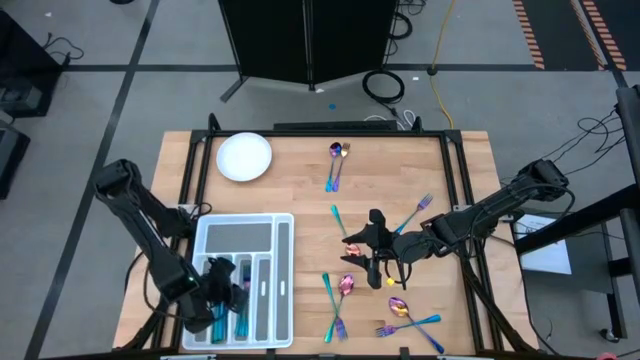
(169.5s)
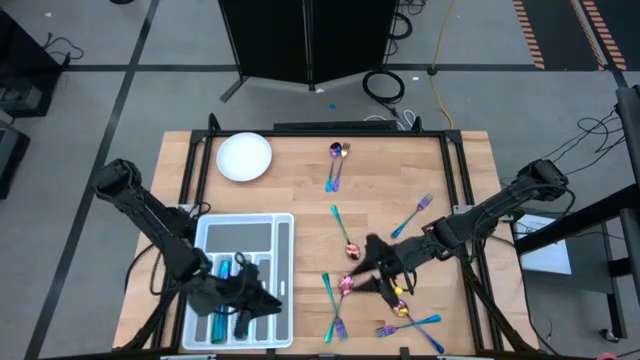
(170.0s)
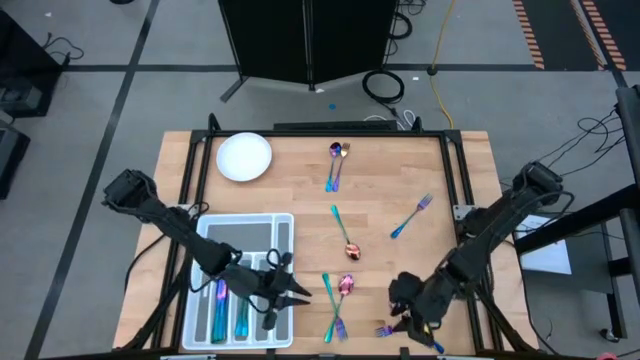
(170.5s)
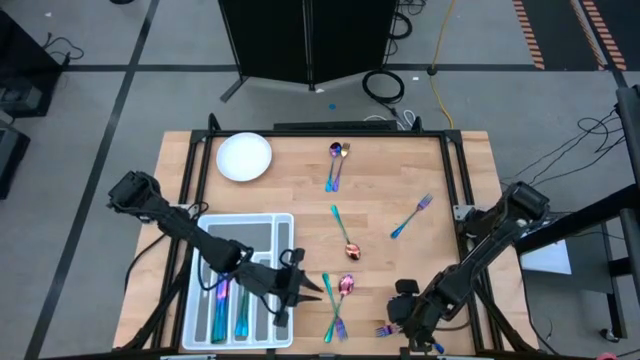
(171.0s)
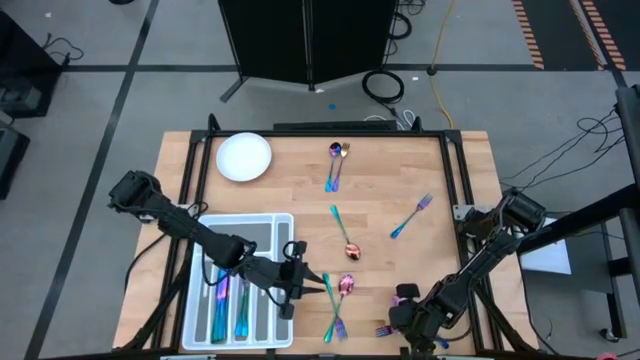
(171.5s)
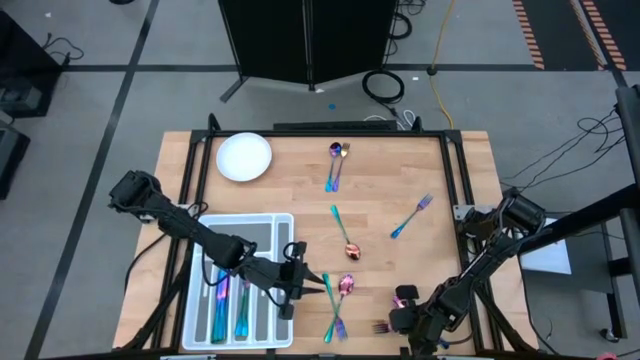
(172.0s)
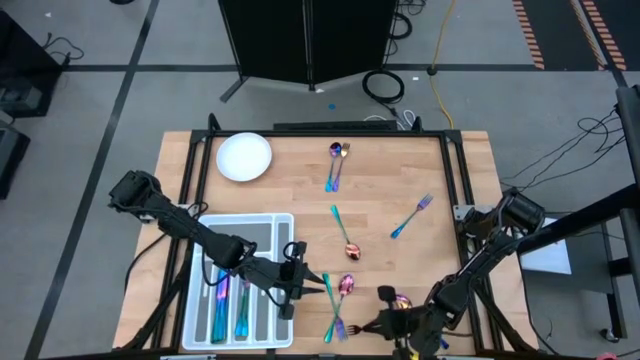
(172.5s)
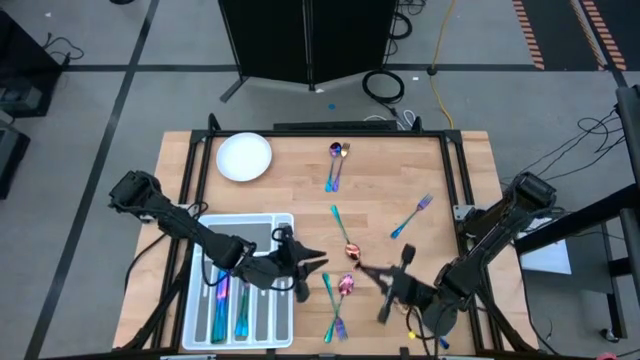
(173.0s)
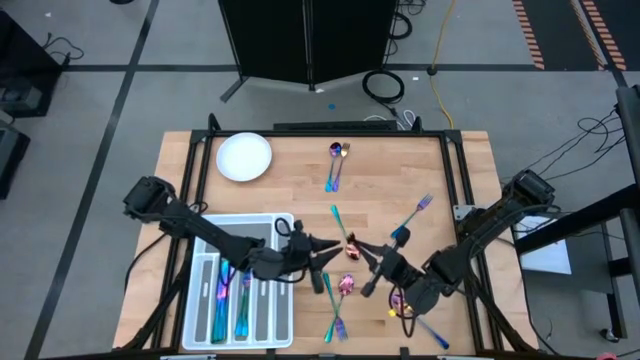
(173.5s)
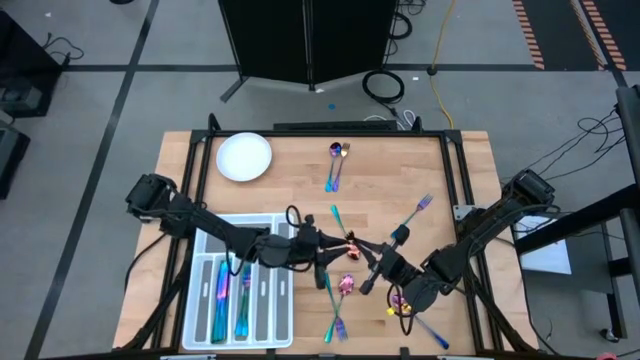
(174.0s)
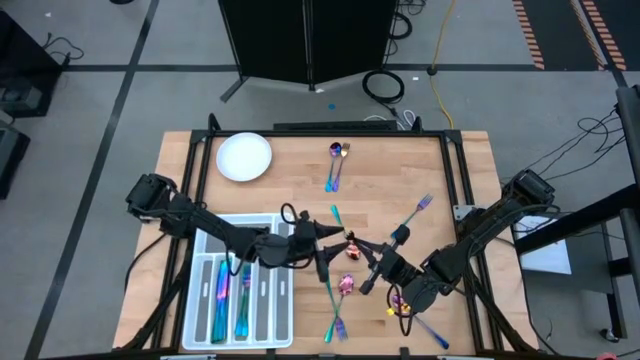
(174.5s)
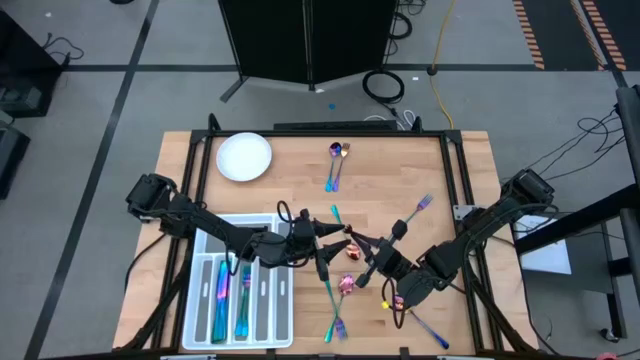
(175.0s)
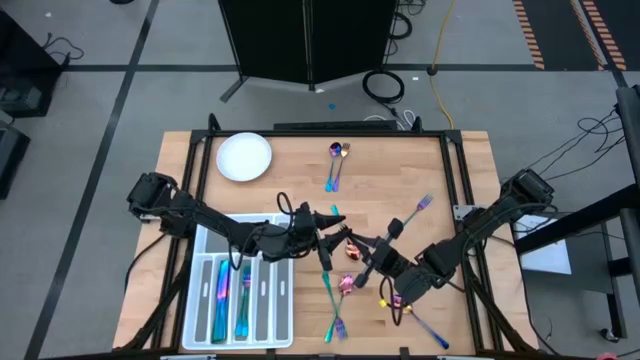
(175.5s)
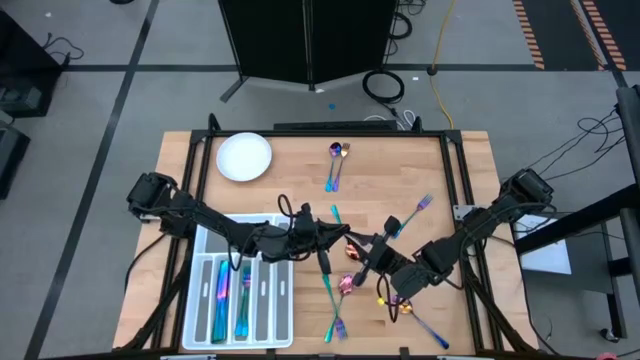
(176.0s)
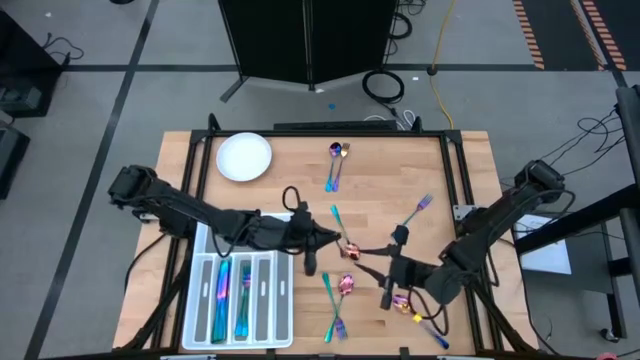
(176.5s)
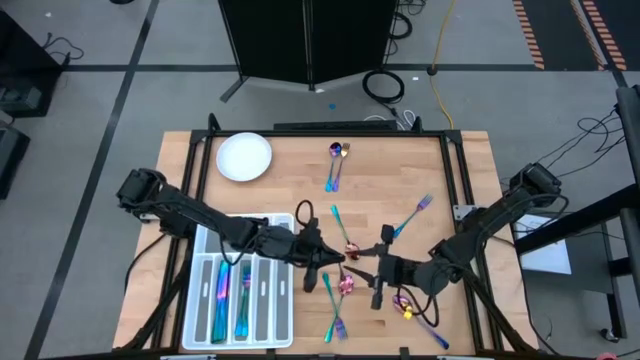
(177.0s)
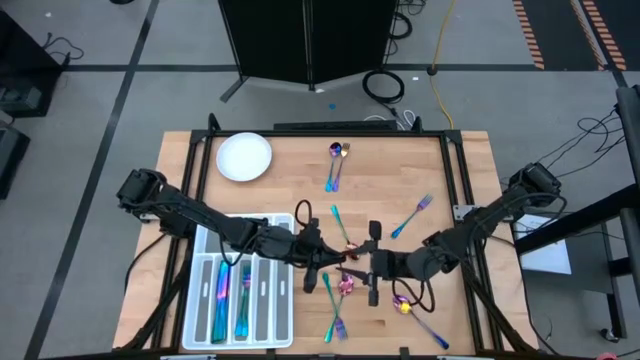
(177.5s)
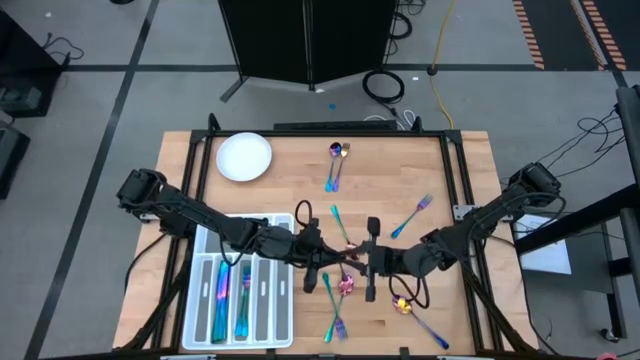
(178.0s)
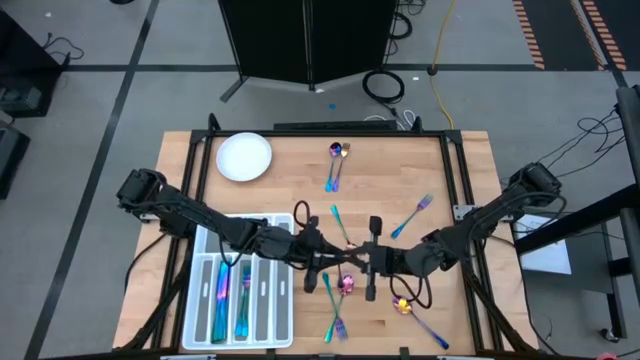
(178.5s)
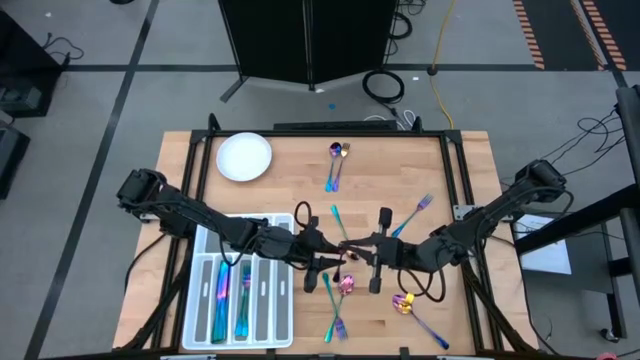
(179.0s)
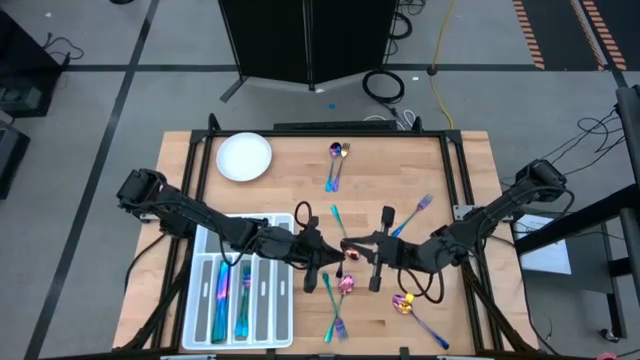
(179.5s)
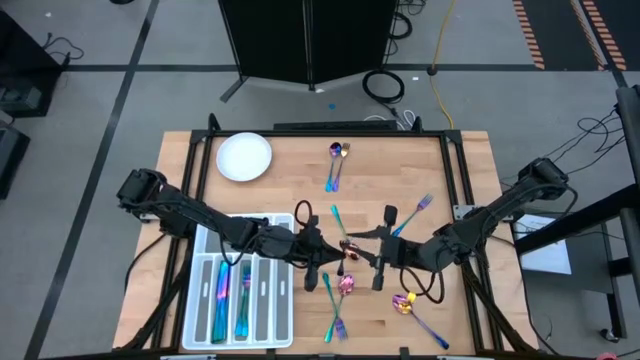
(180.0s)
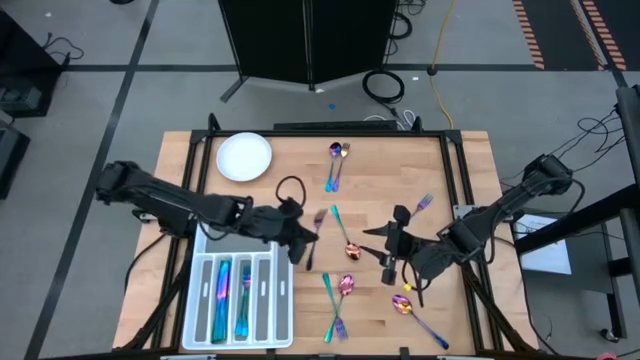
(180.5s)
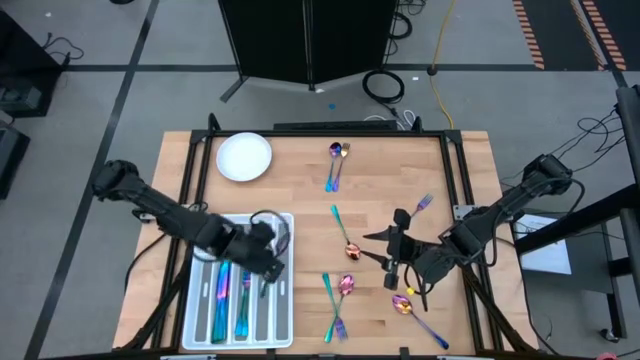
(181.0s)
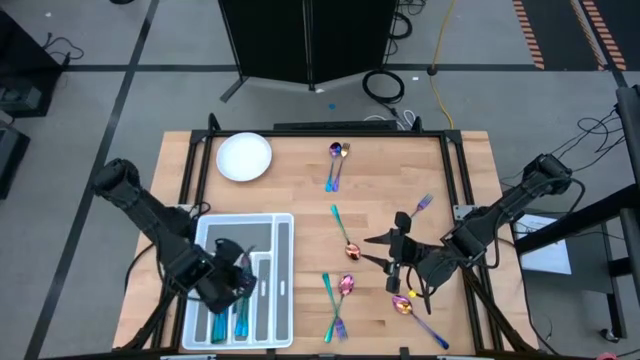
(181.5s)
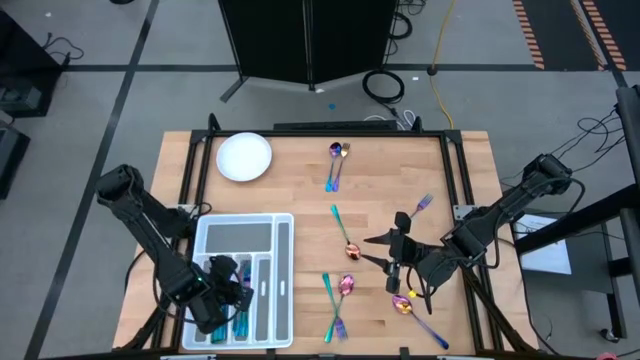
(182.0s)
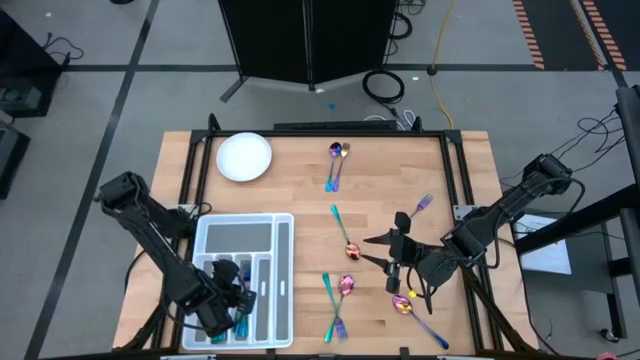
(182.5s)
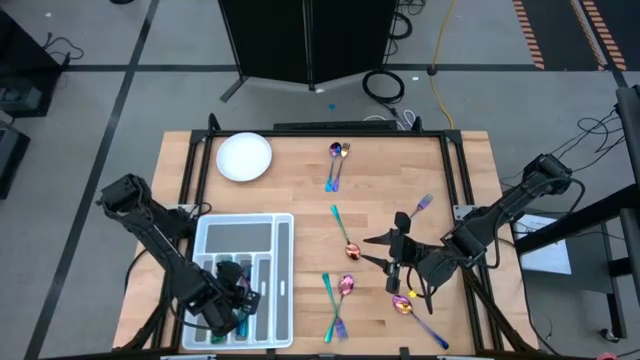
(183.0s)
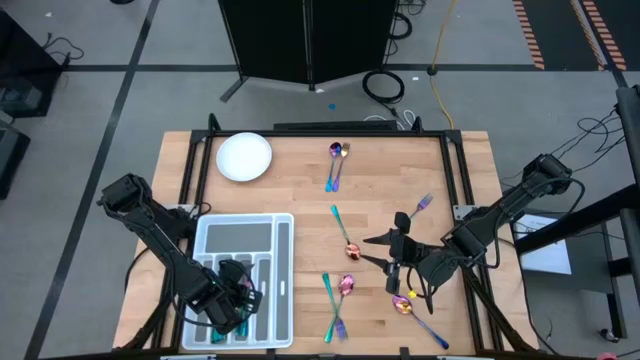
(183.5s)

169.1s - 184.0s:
Task: Sort silverware
Put the iridescent blue fork in the silverware tray

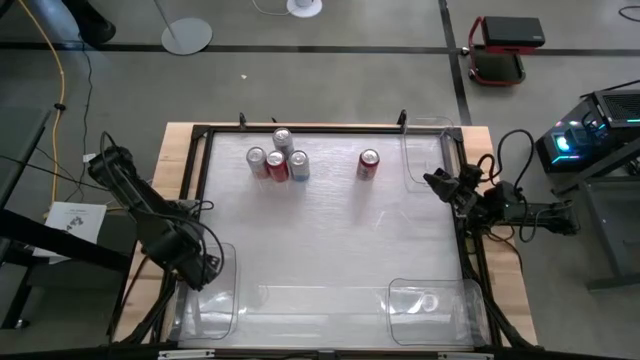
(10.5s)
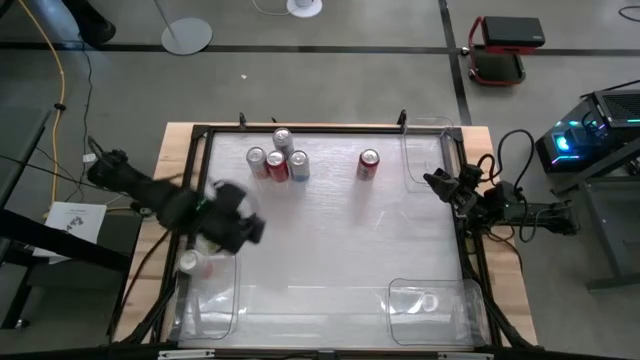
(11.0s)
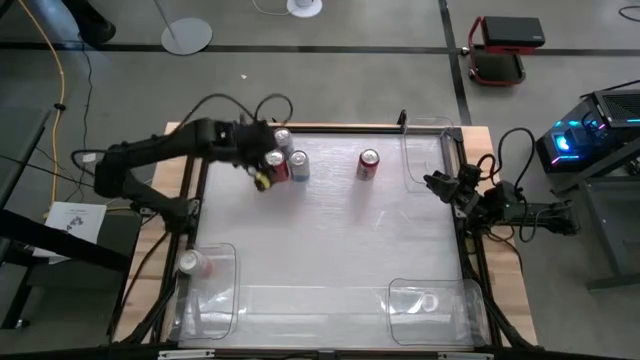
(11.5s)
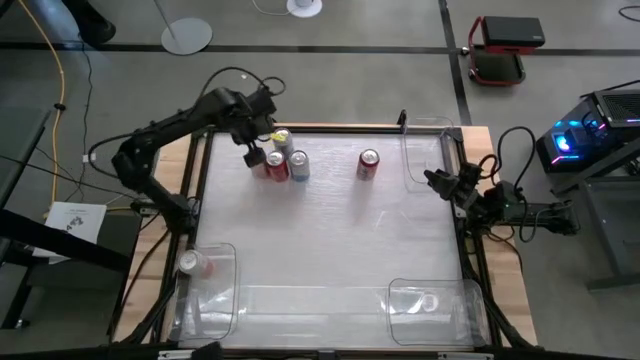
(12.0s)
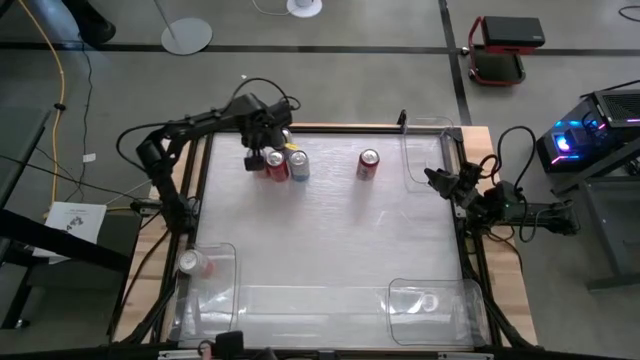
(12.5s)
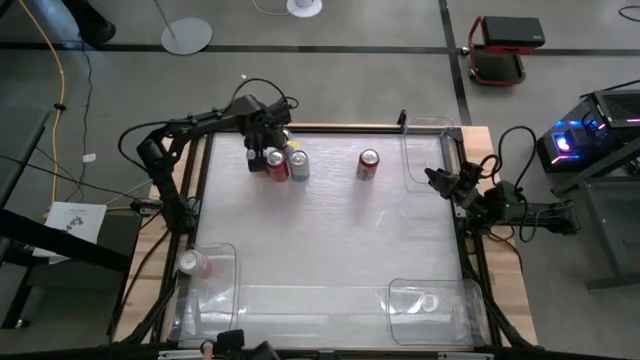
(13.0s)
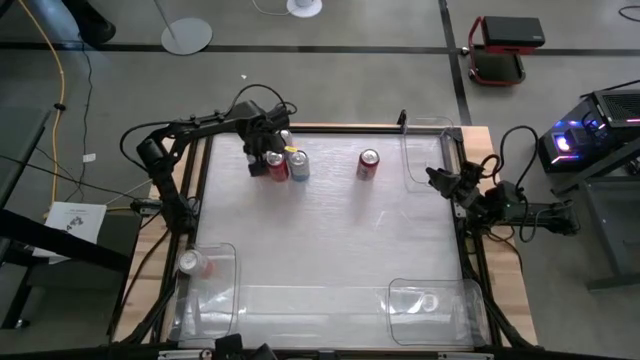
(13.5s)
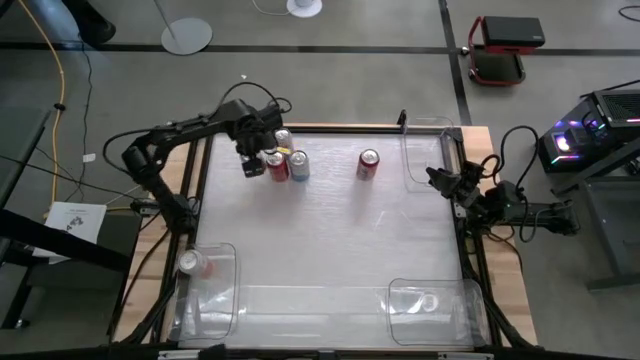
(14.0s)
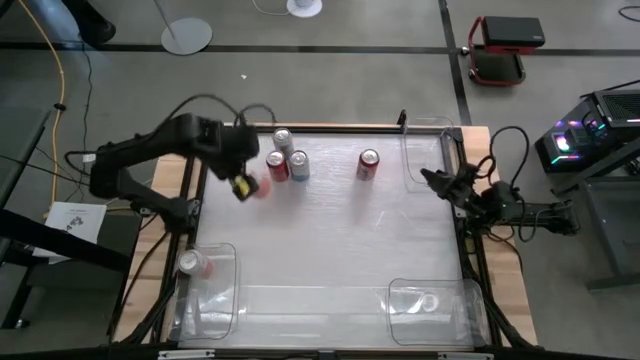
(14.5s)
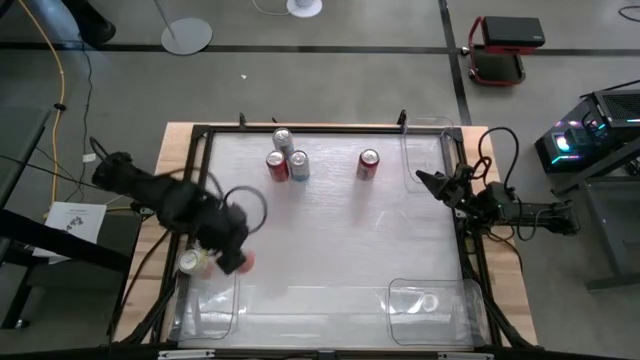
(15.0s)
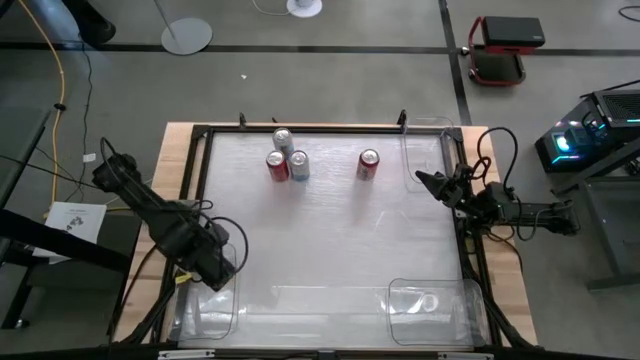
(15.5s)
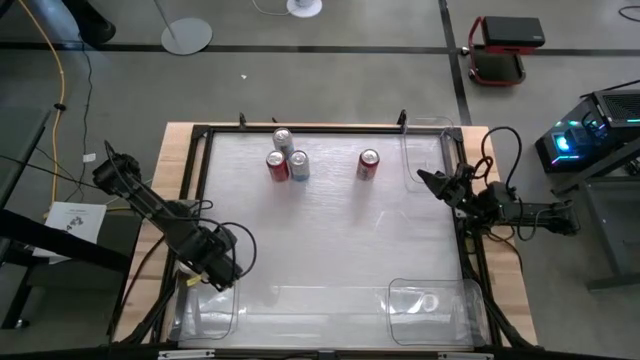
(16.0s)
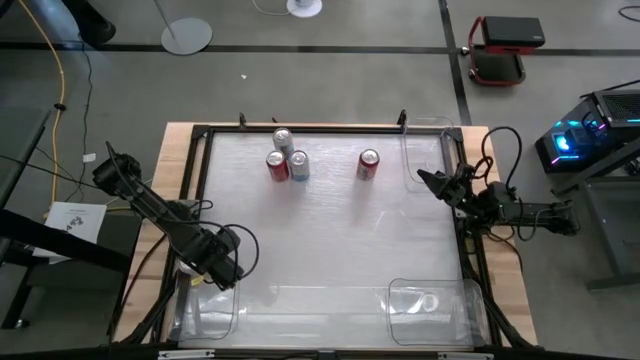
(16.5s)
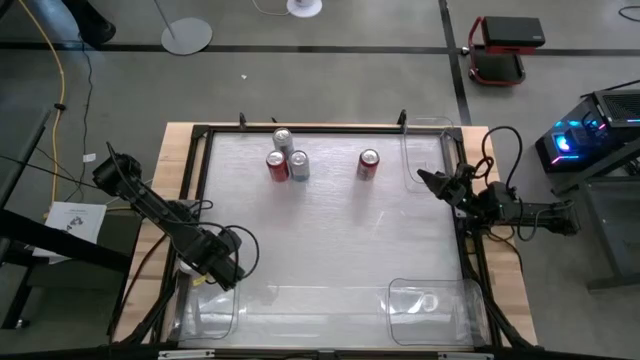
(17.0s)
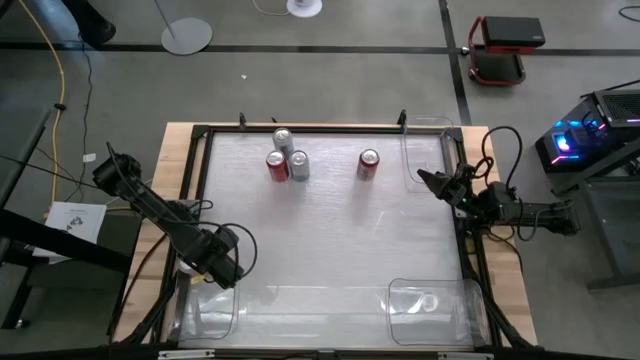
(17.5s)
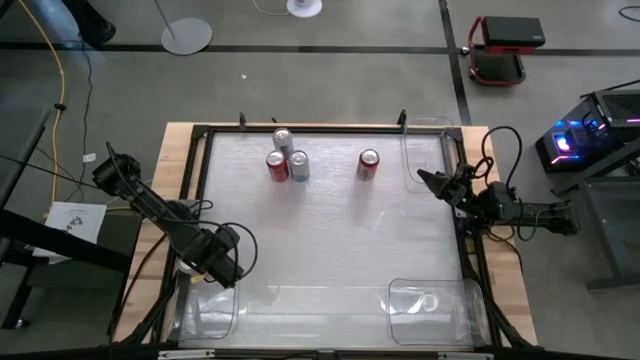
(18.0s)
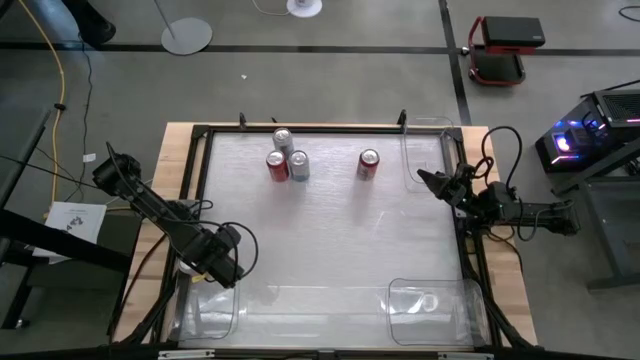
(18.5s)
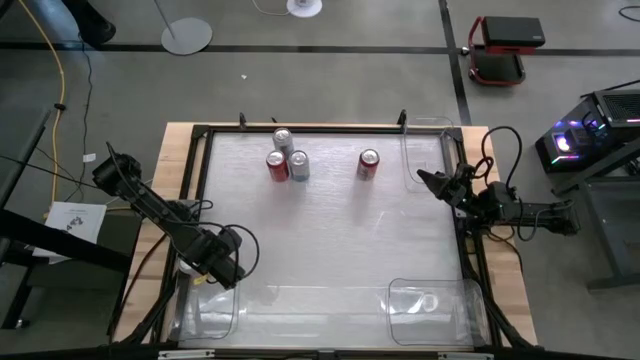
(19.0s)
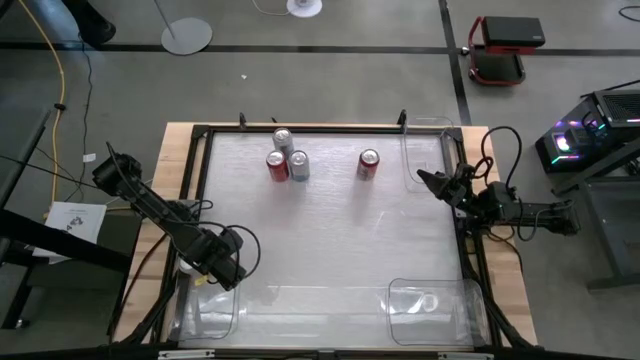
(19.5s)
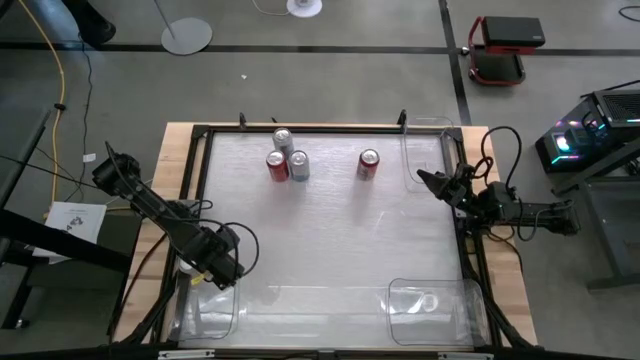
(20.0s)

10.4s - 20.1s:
Task: Sort soda cans
Put the orange-white soda can into the bottom left transparent bin
